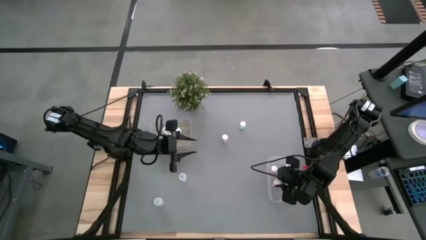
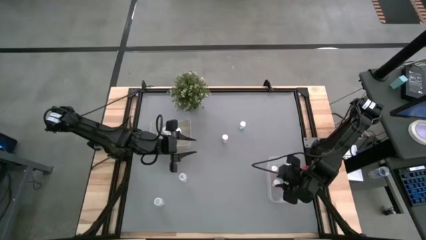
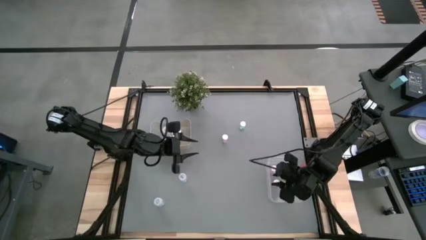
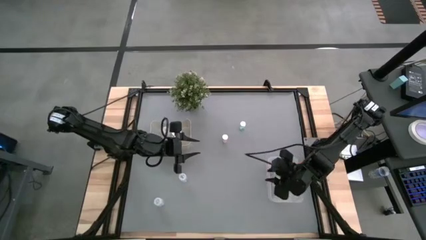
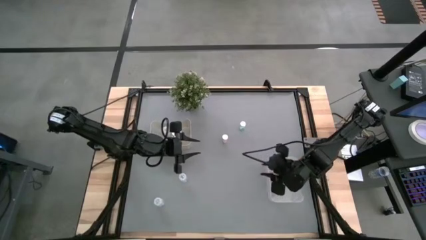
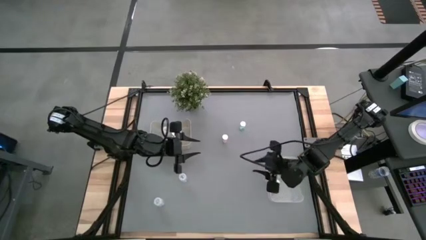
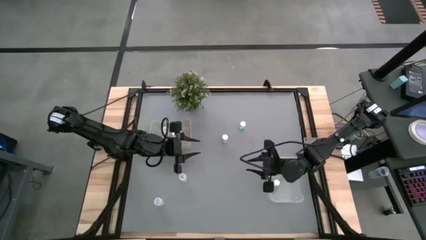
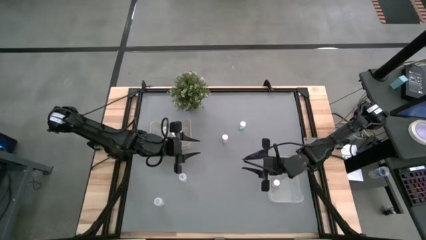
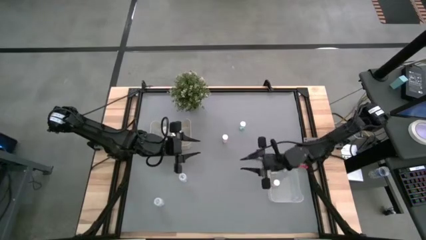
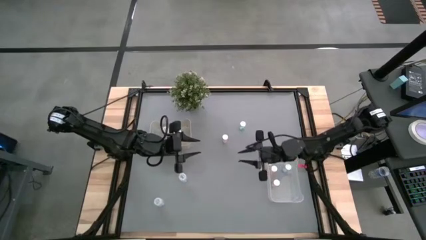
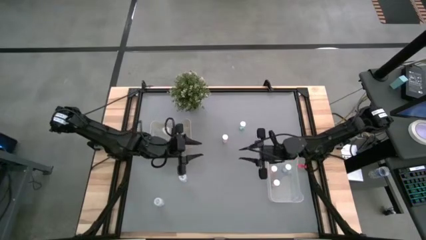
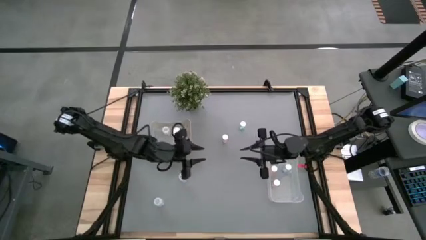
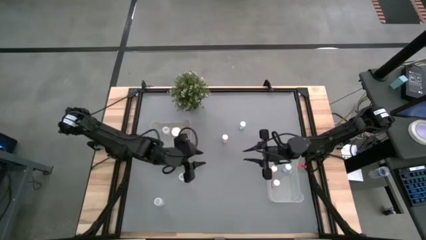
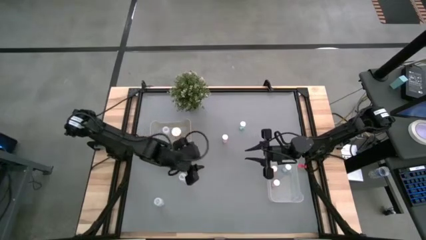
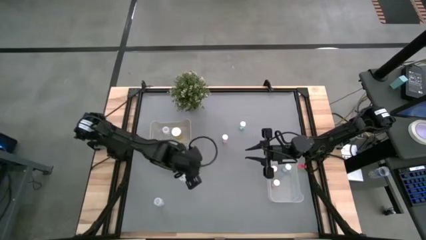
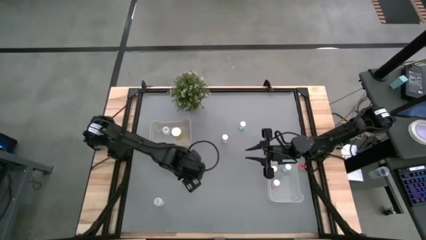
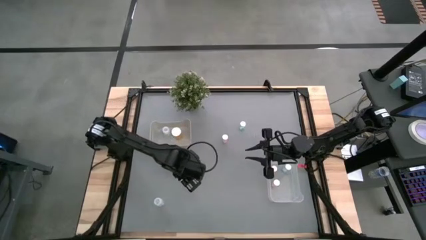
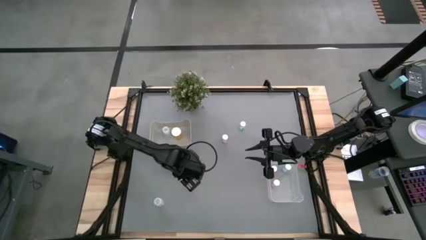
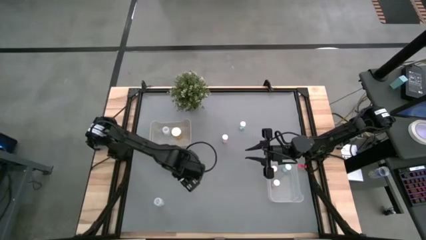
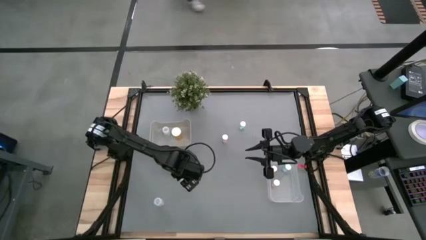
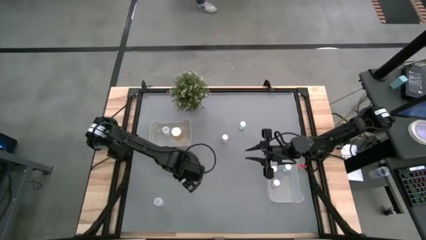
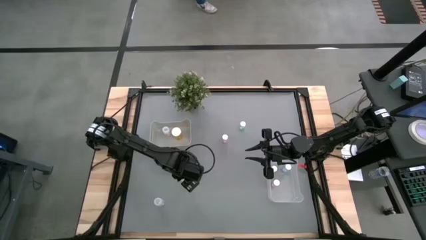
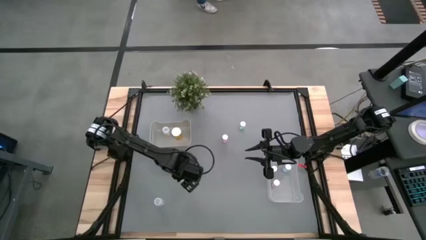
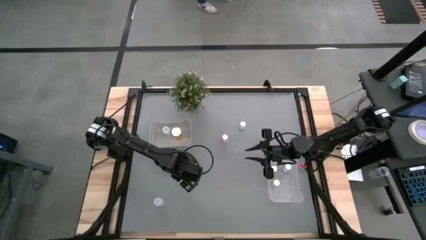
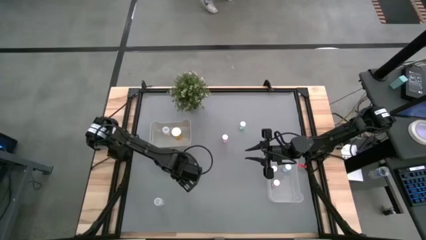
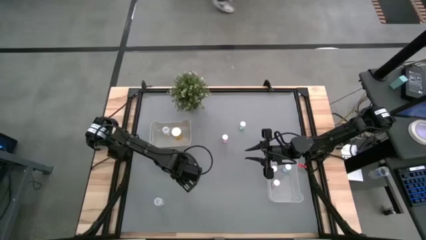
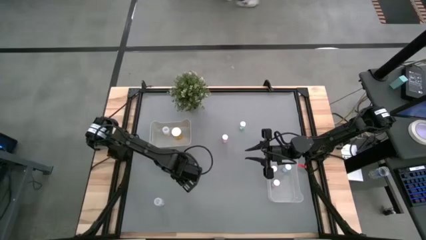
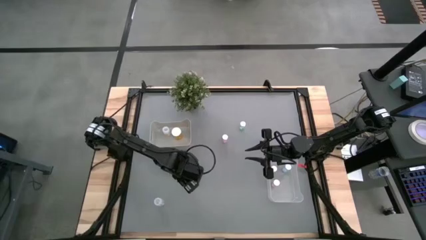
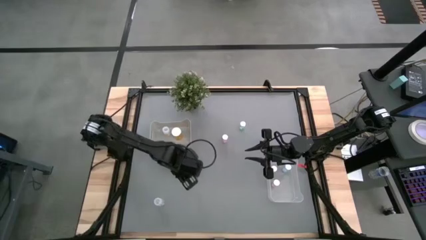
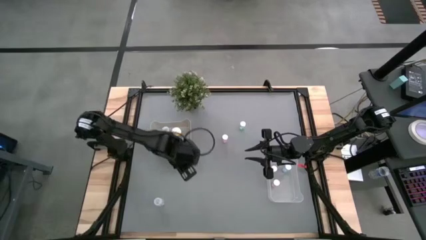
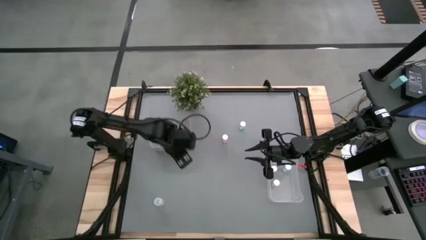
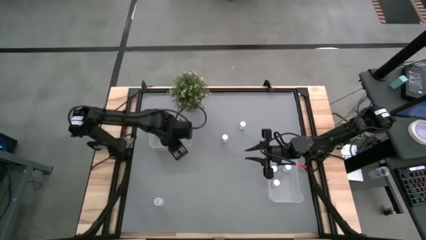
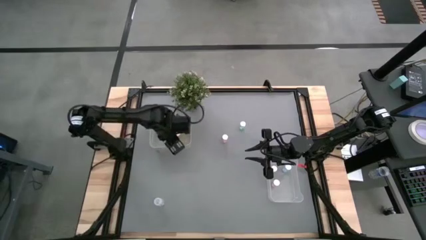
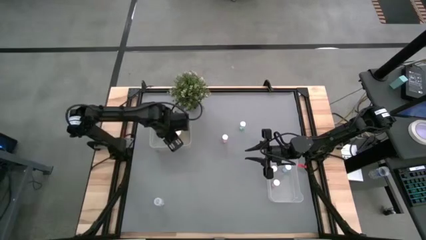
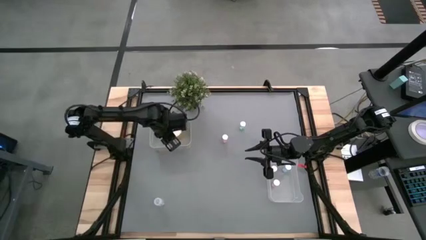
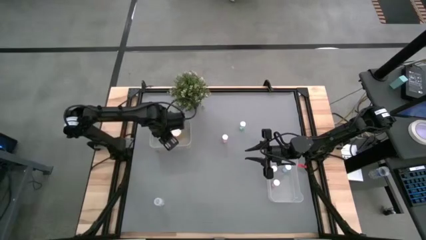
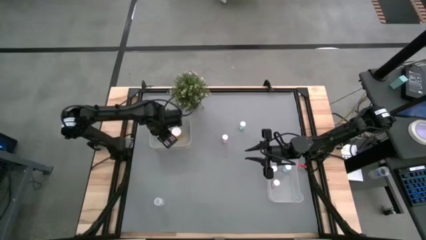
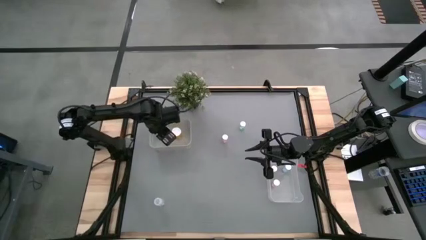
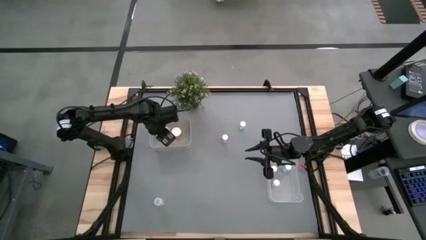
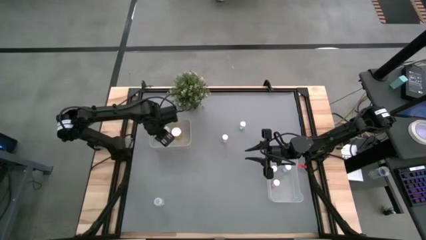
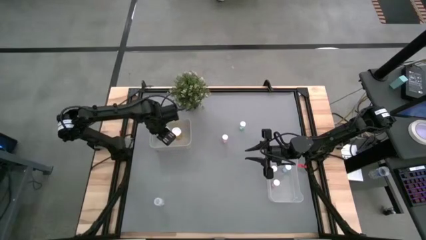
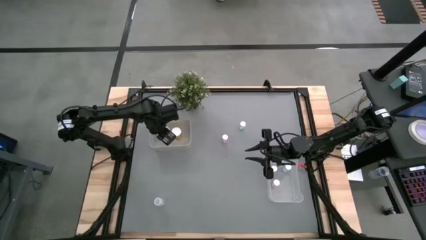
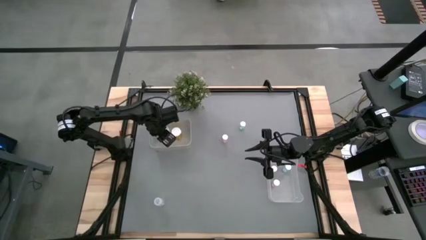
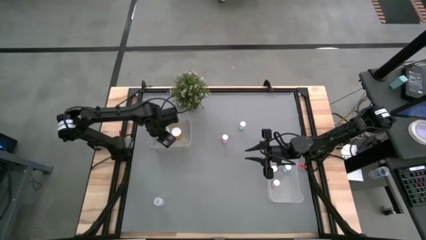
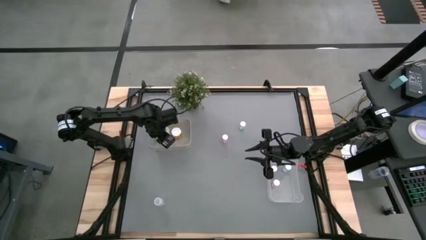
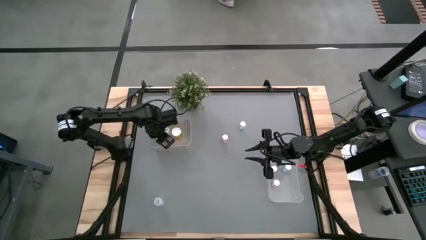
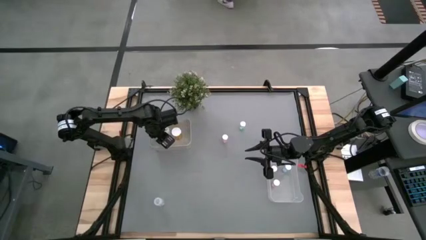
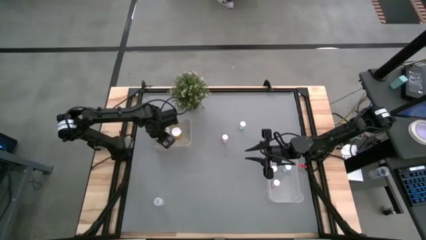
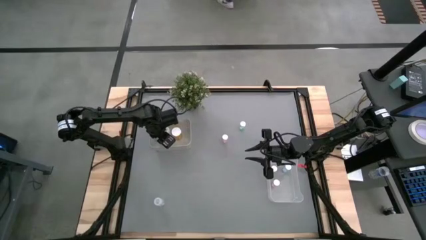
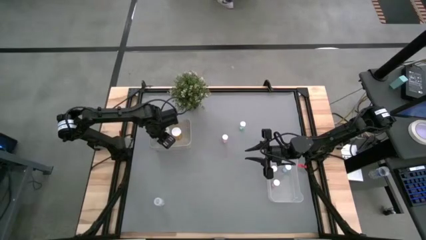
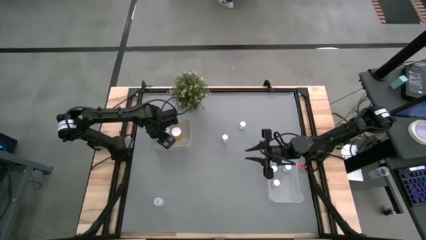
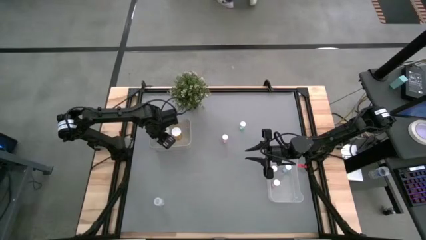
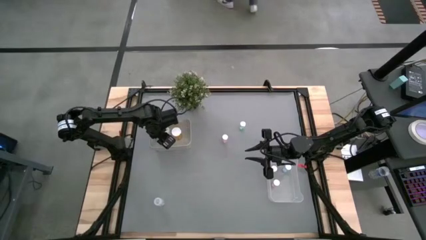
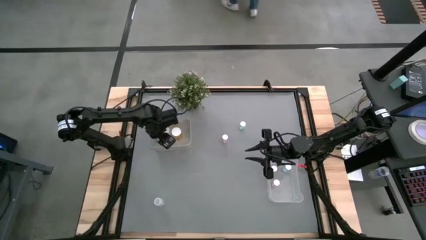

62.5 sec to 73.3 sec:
Task: Pick and place medicine bottles into bin by pill shape (circle, oval)
Put the top transparent pill bottle into the gray bin

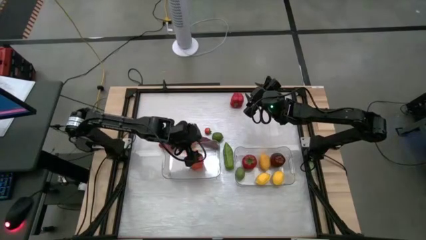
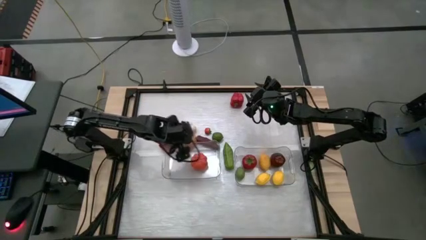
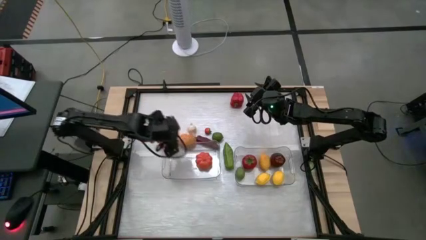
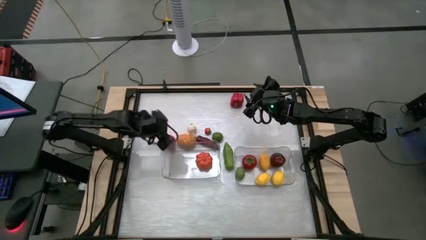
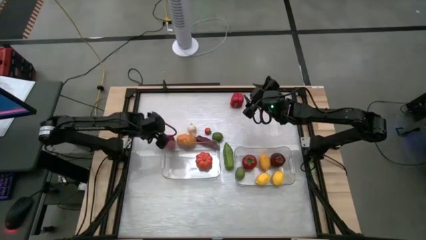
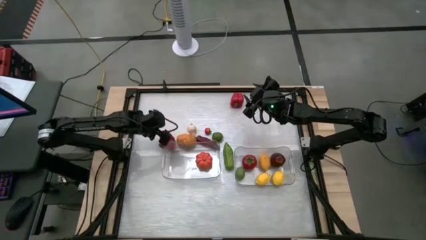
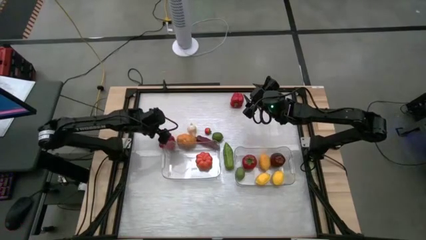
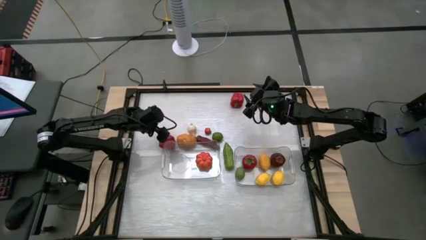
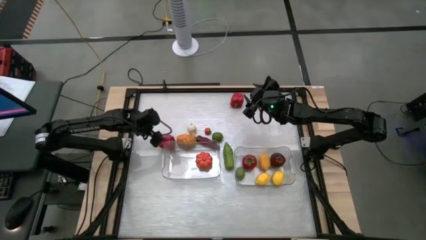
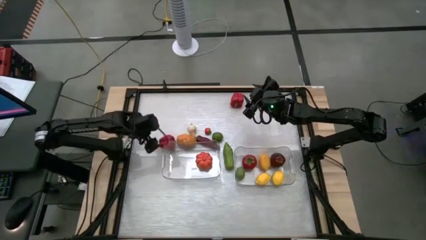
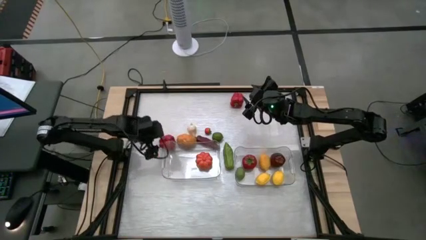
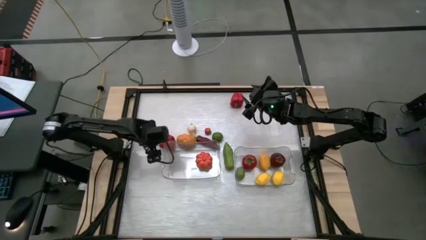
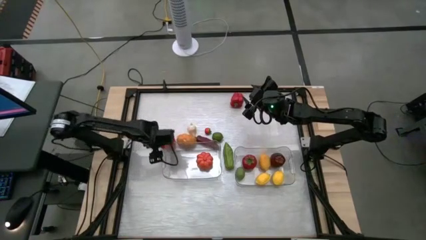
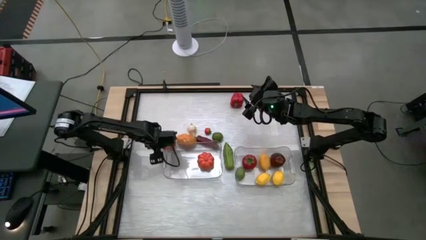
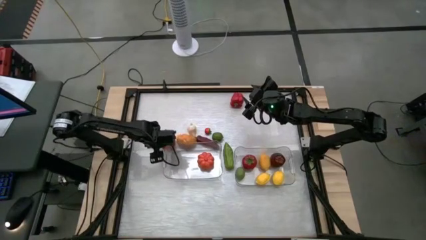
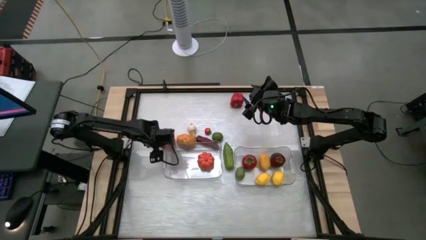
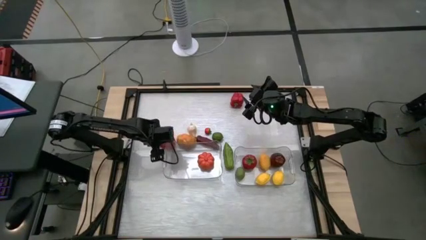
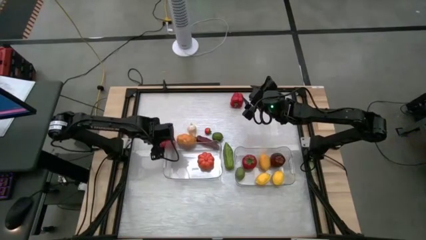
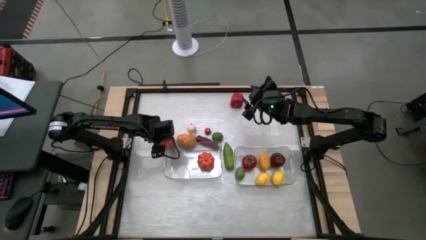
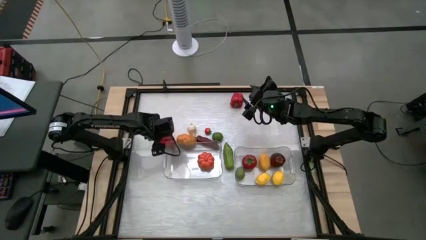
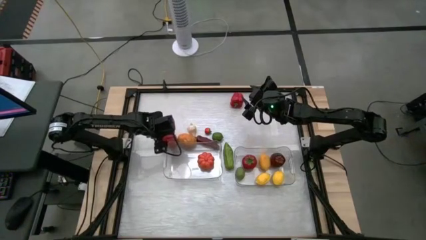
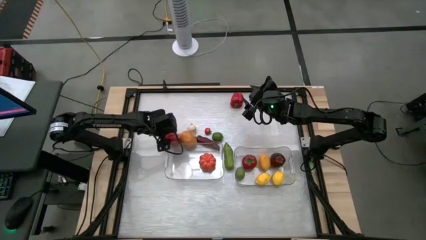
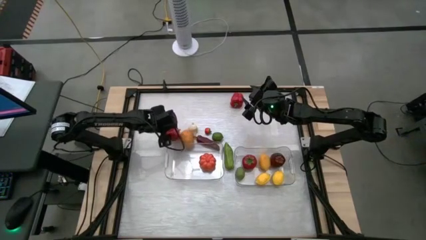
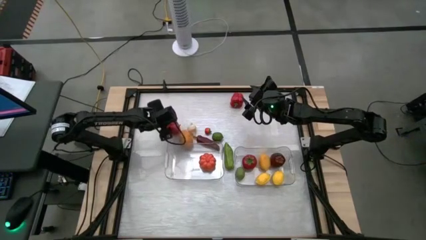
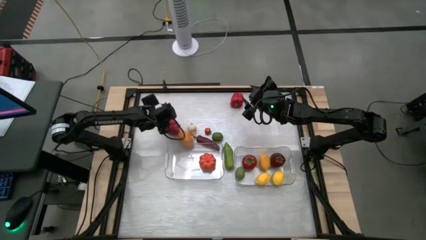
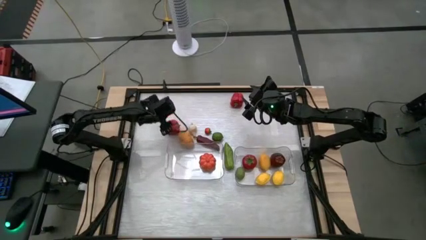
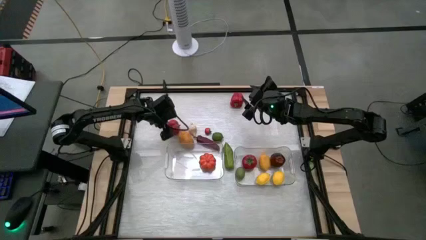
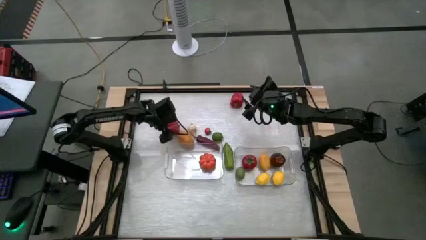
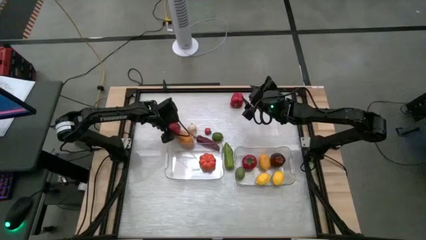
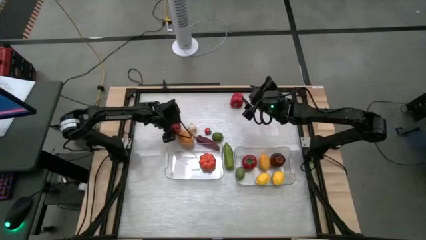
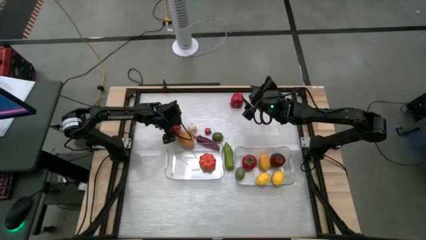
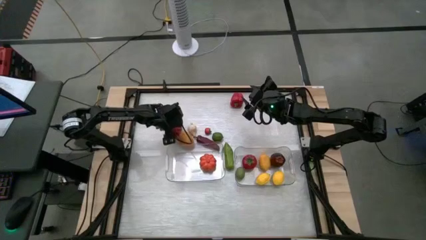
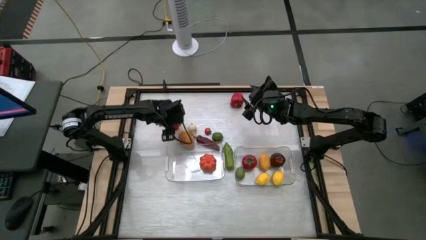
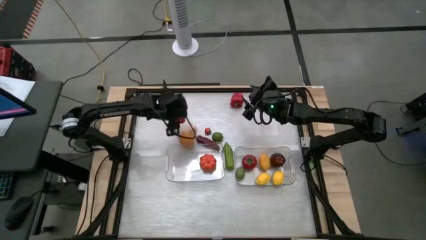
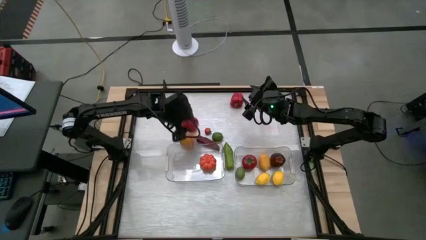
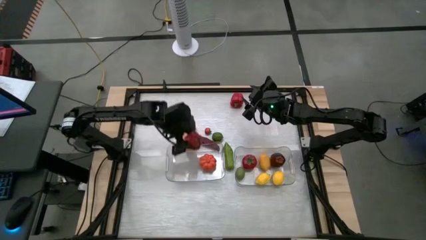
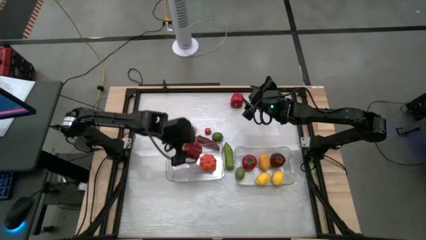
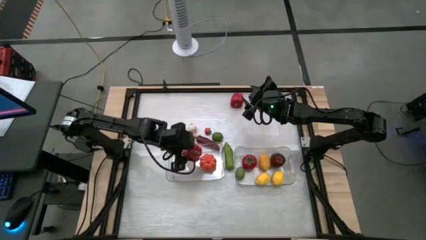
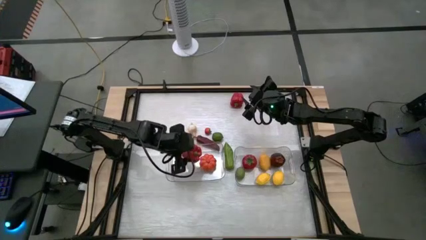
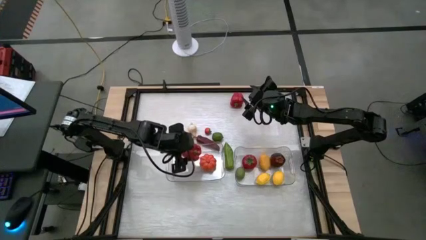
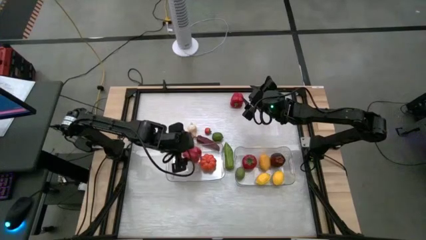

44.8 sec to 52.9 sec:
Task: Sort produce into baskets
Put the left red bell pepper into the left transparent bin
